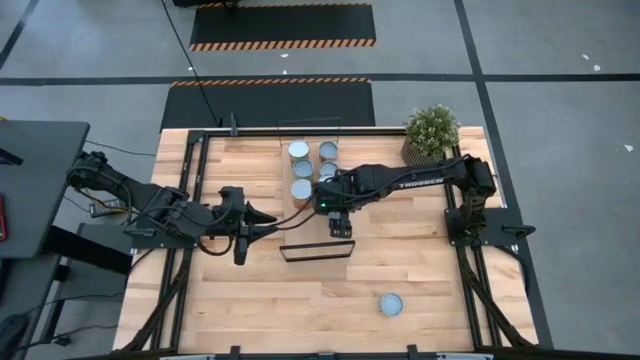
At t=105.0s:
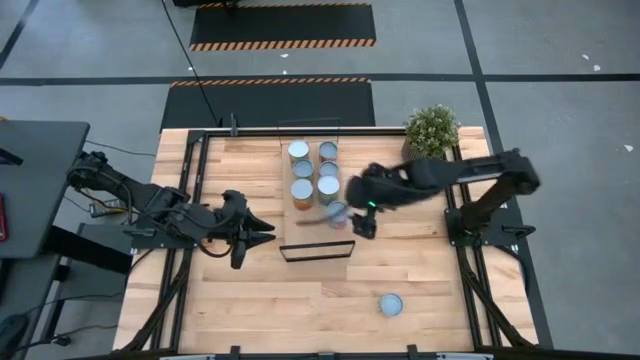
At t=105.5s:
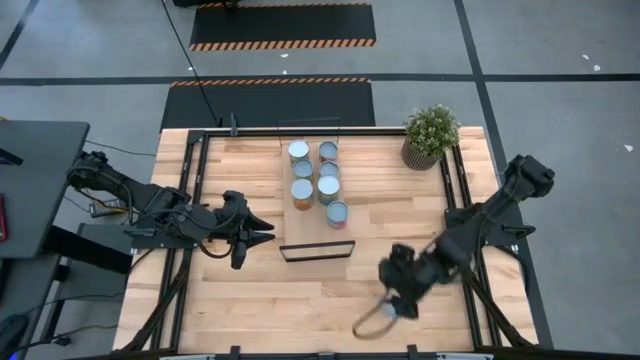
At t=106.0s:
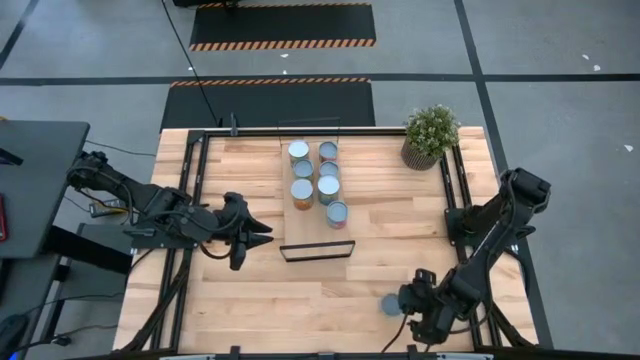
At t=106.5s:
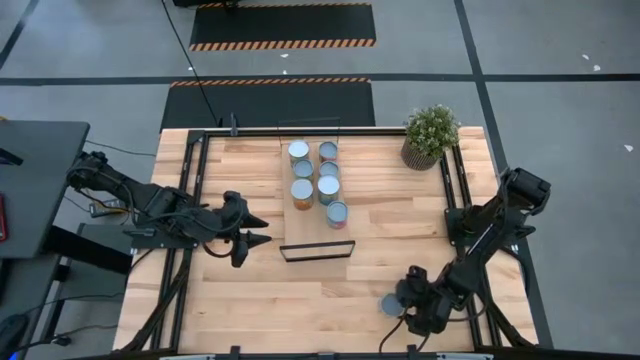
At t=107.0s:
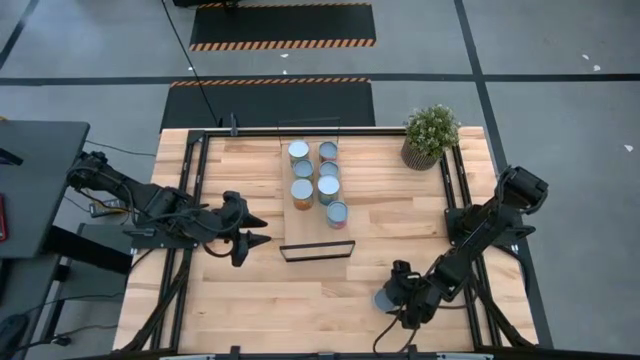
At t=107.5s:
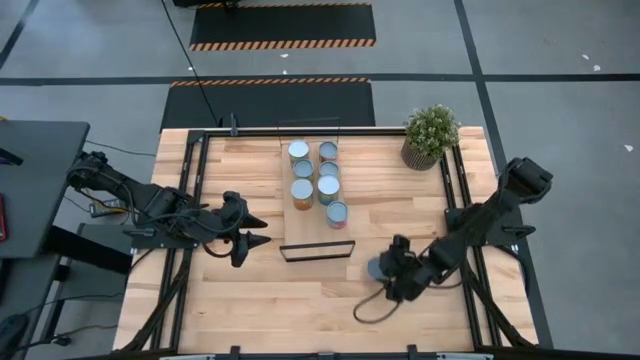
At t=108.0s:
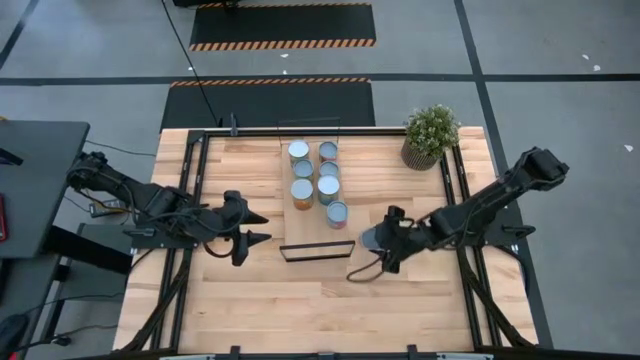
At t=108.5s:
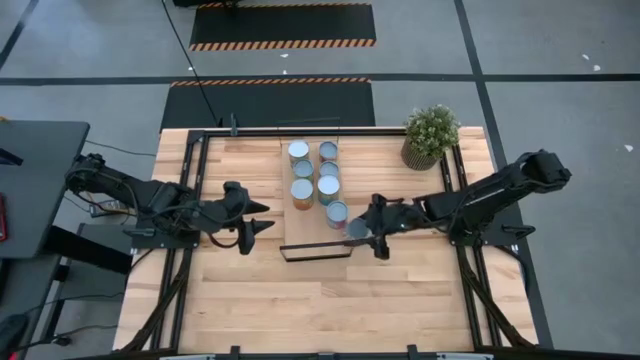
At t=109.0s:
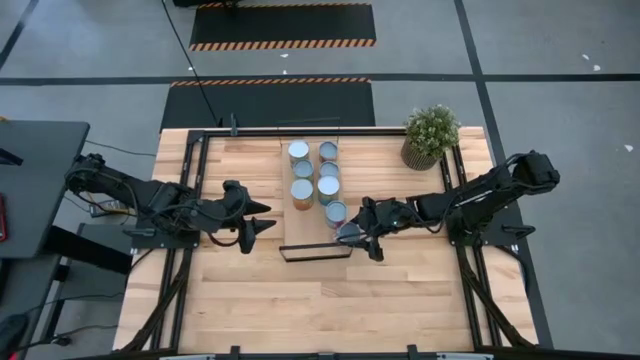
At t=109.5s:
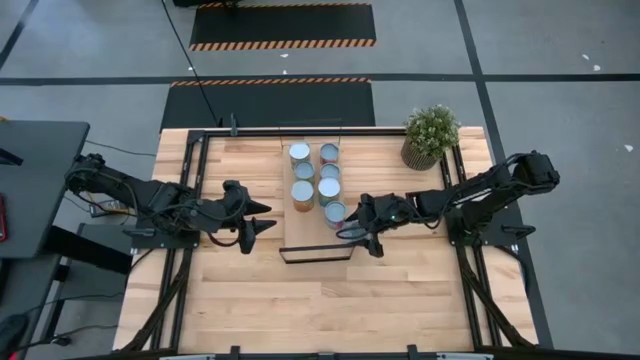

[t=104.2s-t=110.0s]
Task: Pick and place cans onto a shelf
Put the white can on the shelf

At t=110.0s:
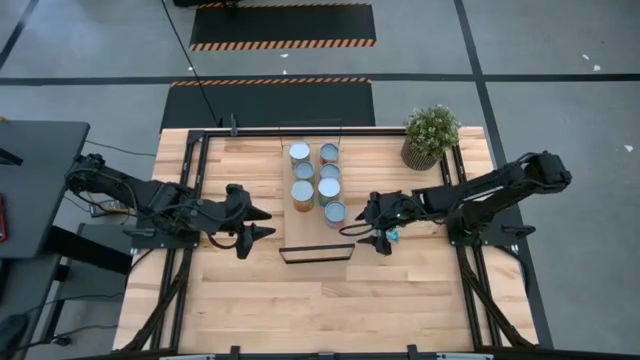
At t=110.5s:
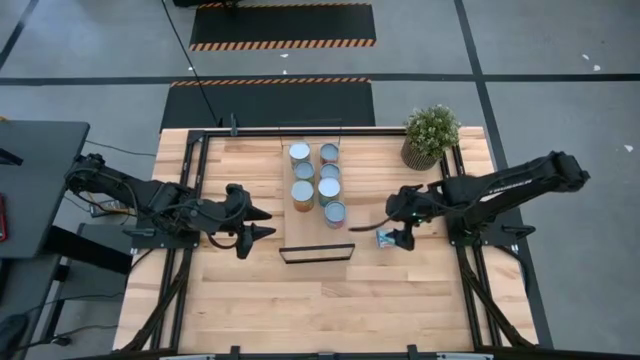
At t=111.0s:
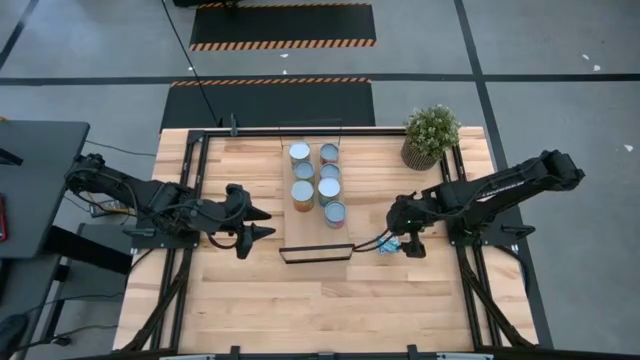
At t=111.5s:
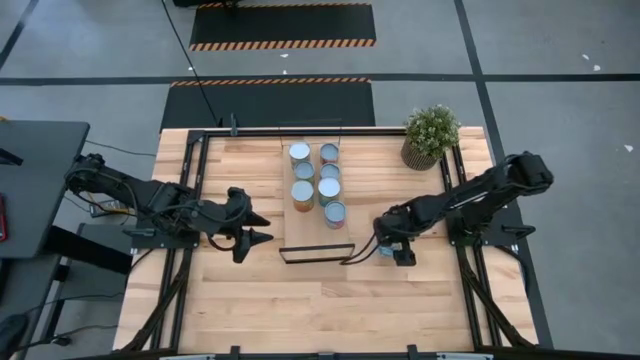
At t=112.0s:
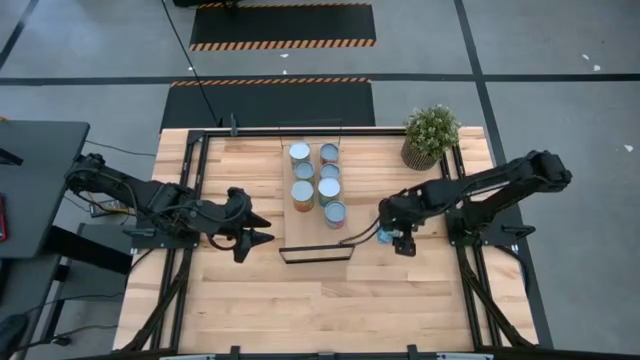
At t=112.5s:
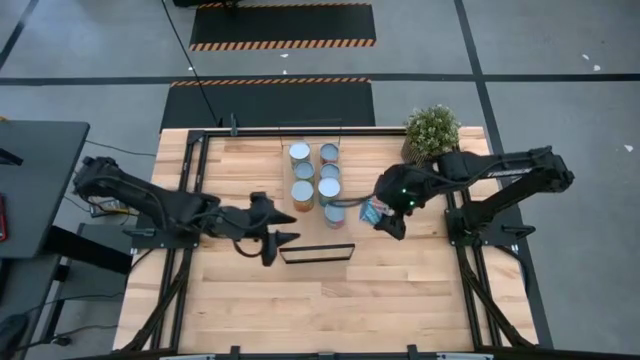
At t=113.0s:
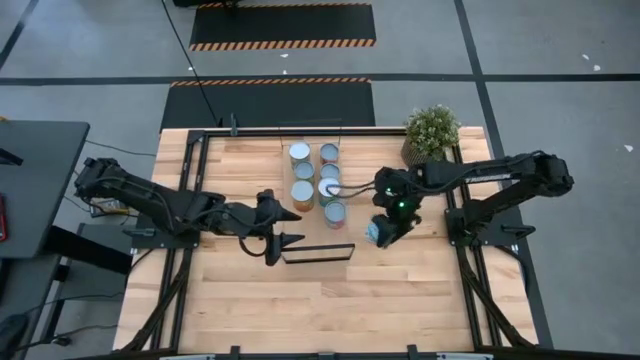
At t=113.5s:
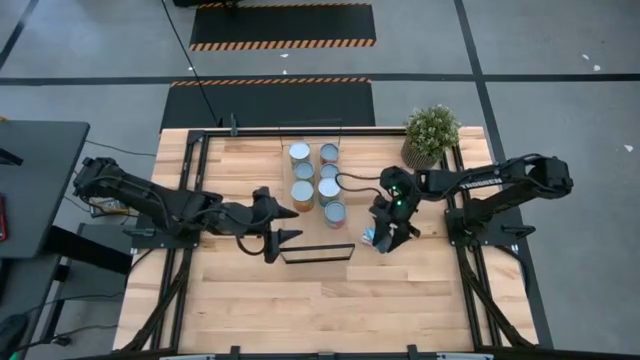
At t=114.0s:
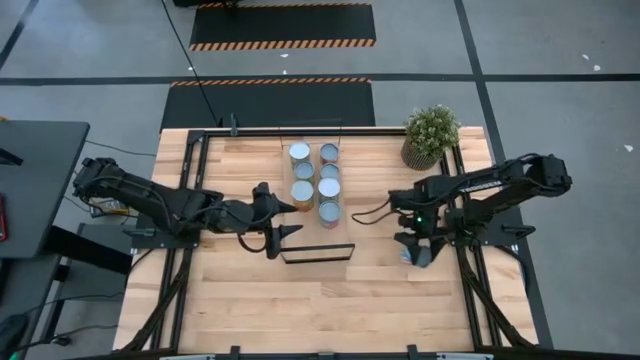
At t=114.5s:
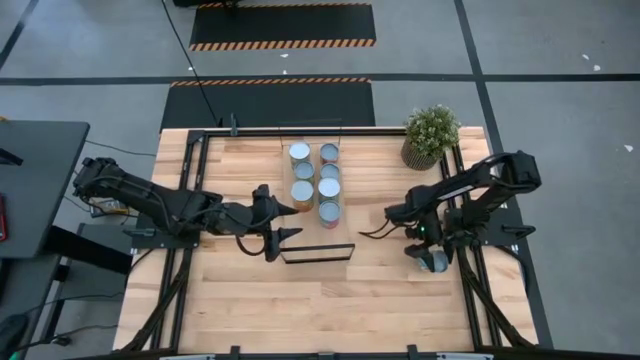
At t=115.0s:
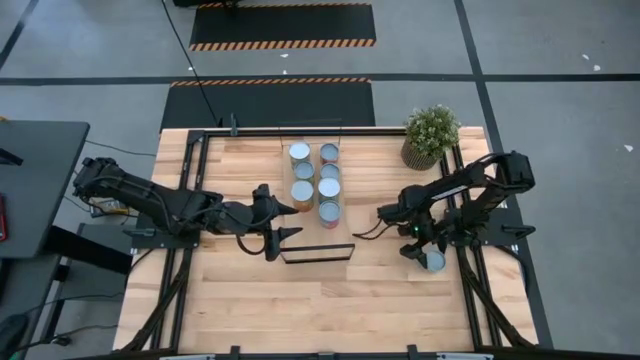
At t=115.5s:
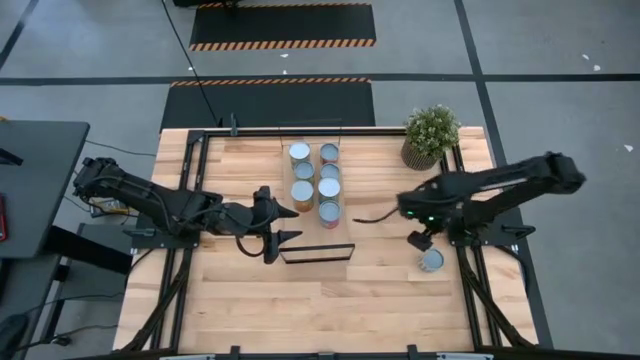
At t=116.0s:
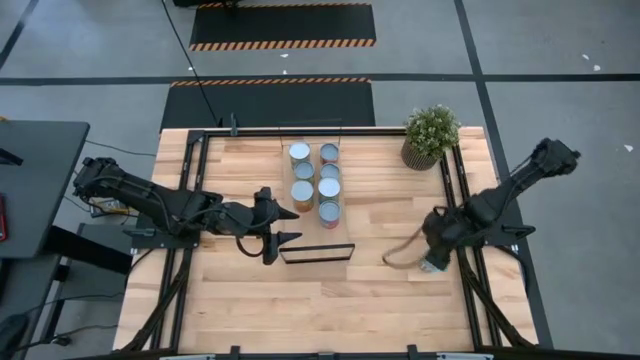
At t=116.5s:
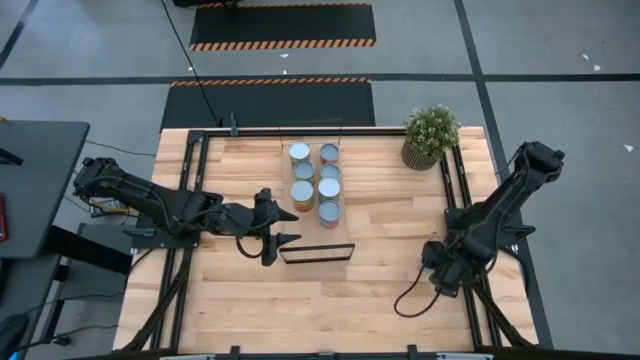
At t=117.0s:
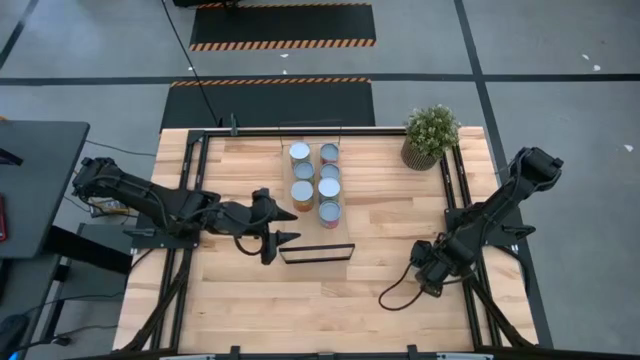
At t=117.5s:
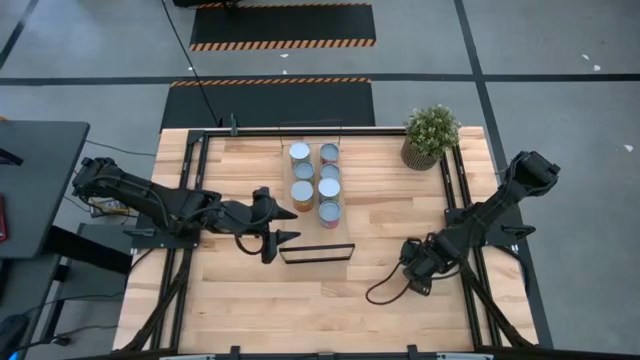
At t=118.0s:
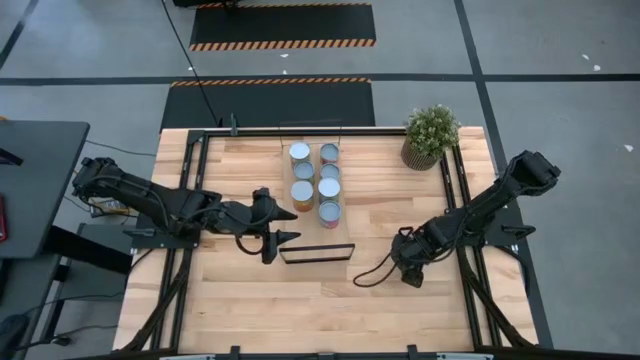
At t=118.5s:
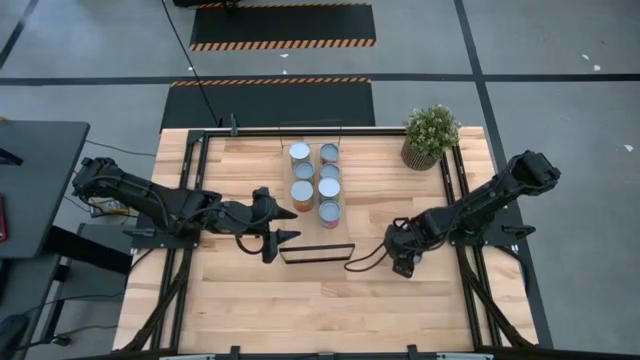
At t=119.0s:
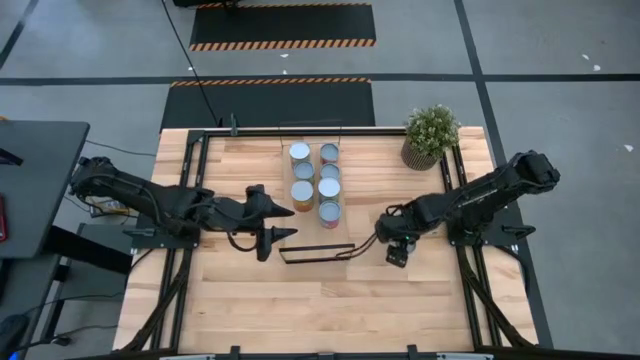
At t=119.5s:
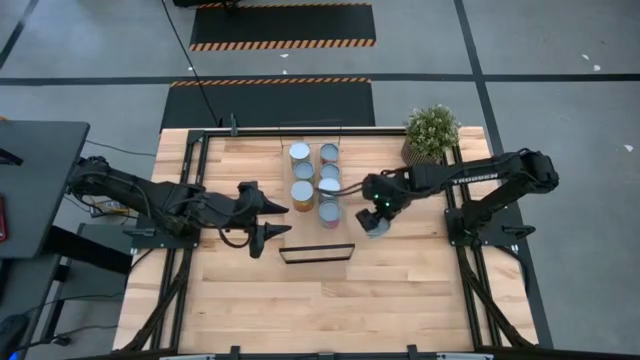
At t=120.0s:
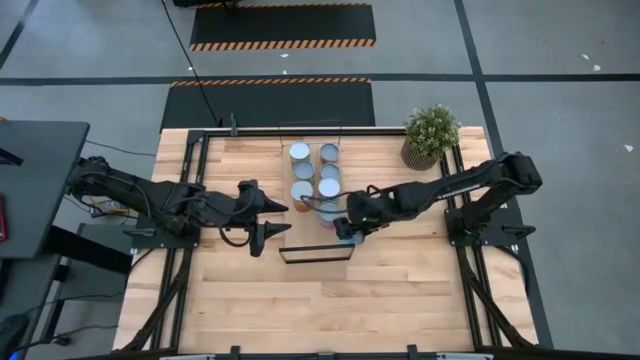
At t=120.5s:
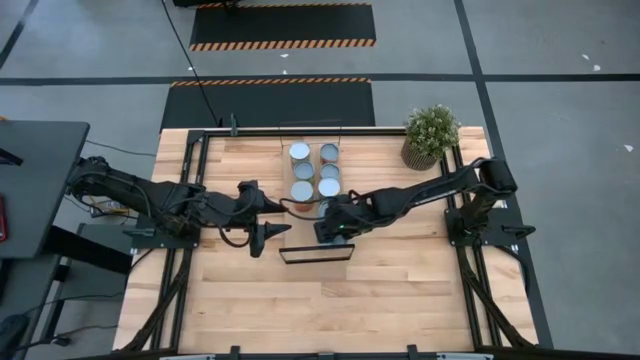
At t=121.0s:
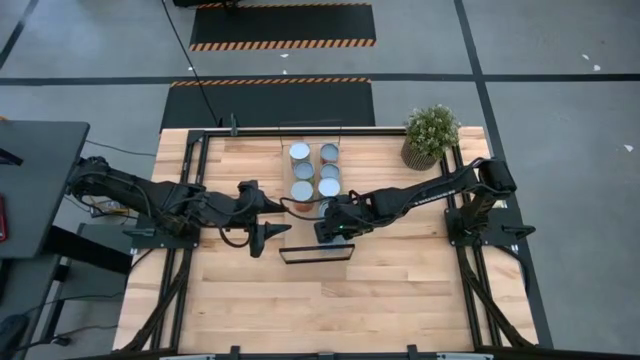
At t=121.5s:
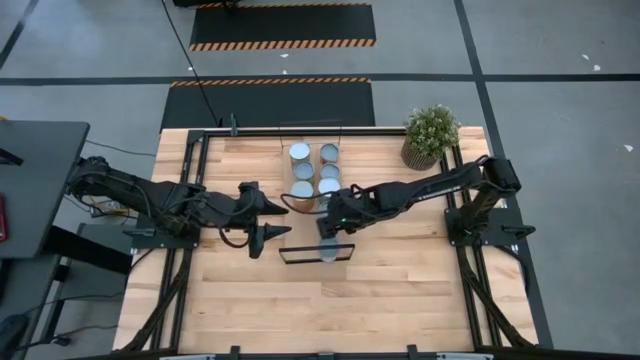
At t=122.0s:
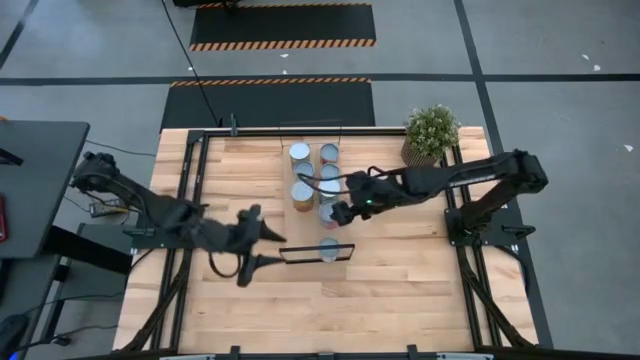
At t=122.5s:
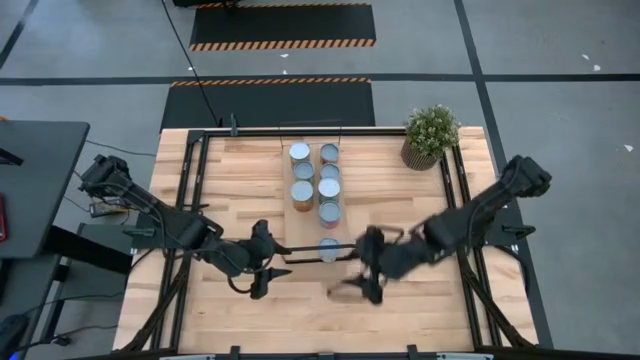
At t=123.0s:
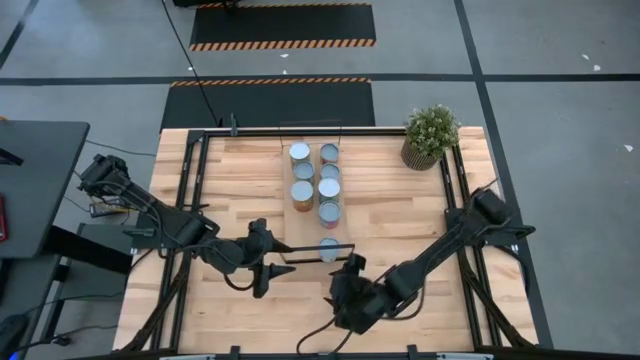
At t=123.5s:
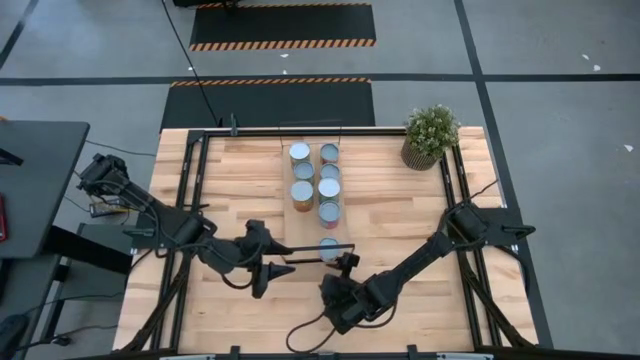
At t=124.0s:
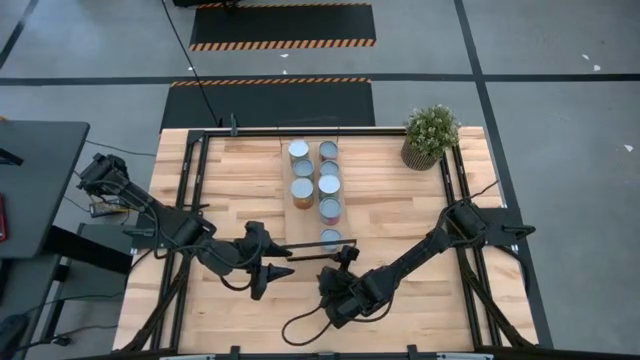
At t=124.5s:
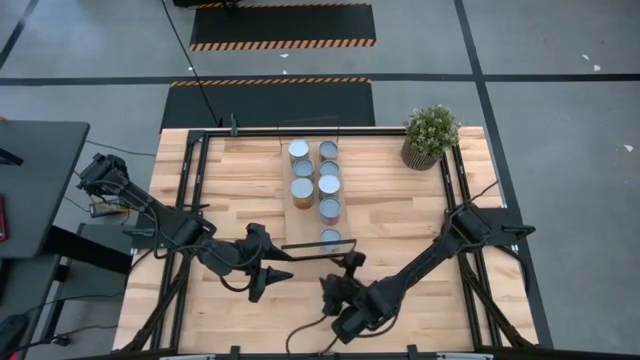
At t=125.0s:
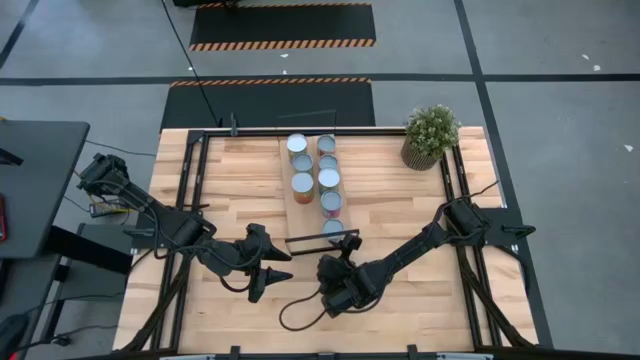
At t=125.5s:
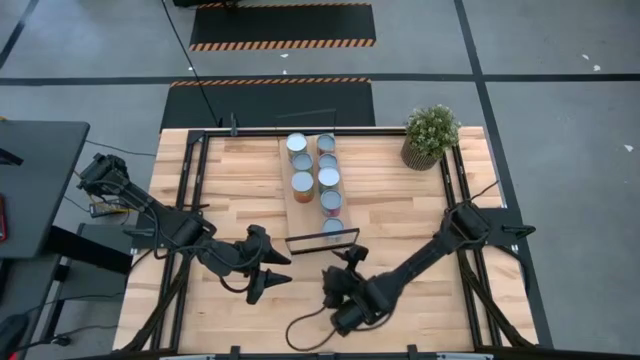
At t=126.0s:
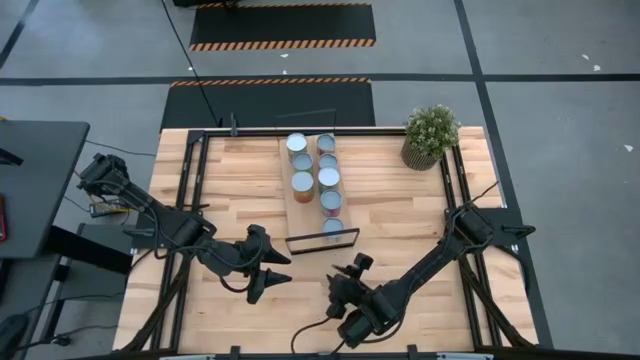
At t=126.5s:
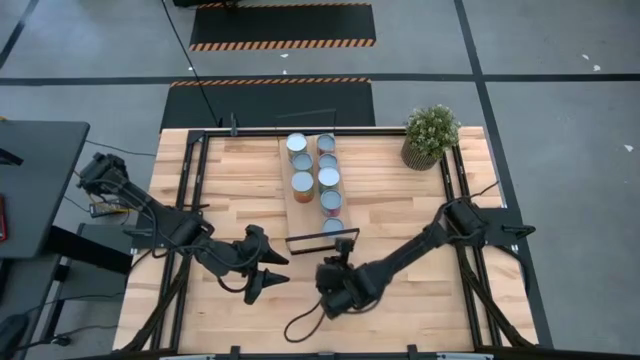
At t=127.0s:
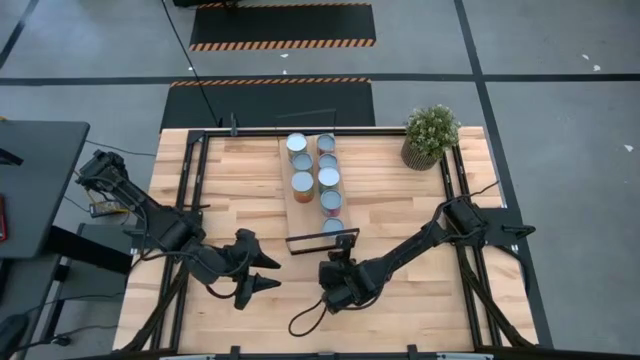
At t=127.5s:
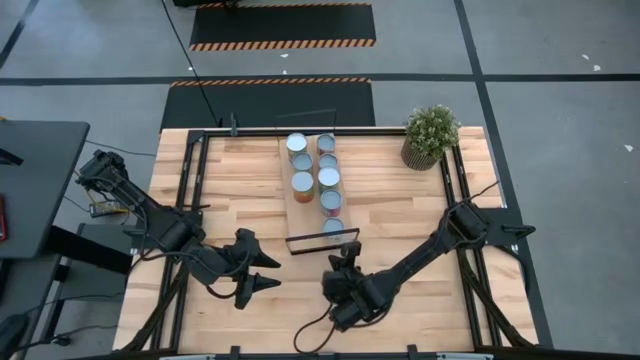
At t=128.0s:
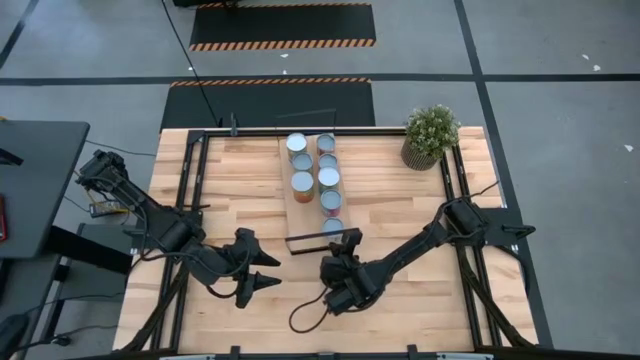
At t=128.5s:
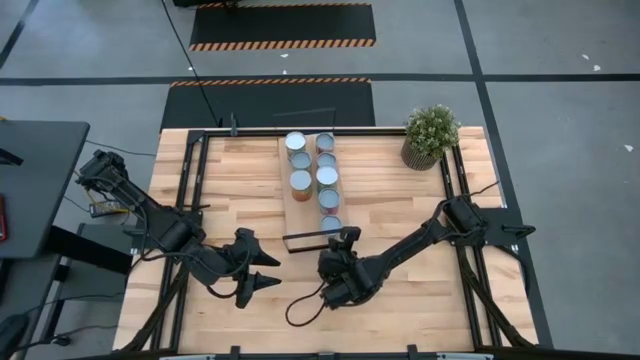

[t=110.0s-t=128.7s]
Put the white can on the shelf
